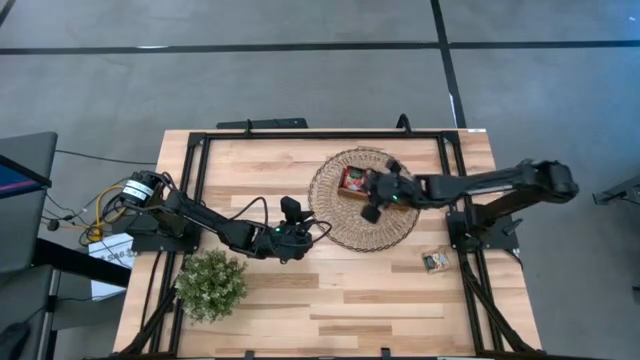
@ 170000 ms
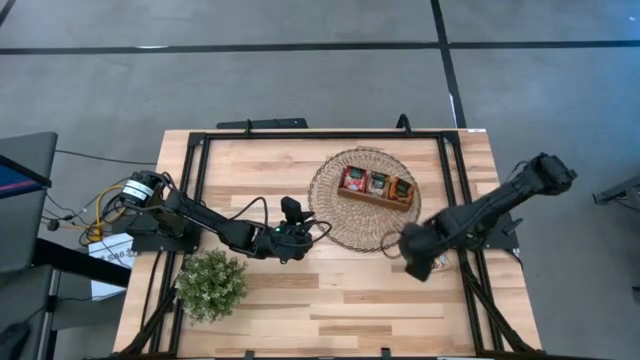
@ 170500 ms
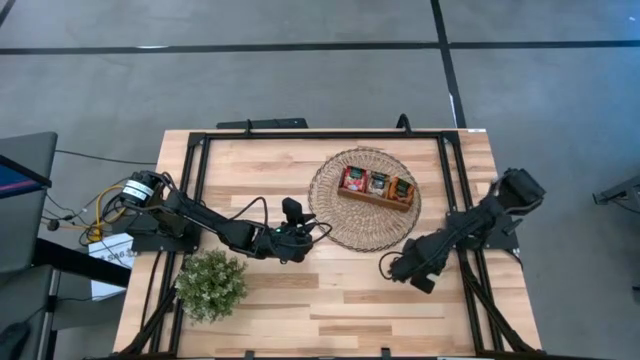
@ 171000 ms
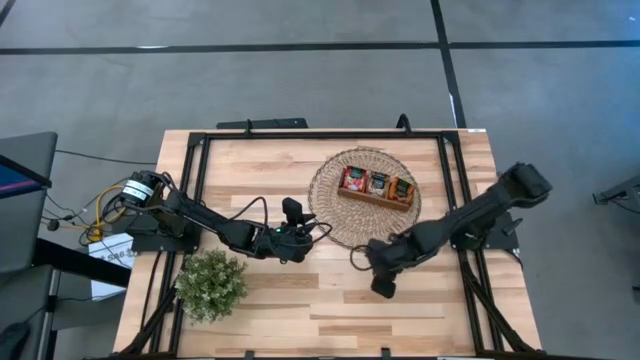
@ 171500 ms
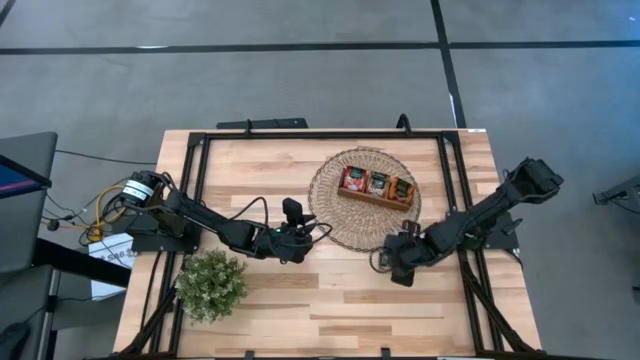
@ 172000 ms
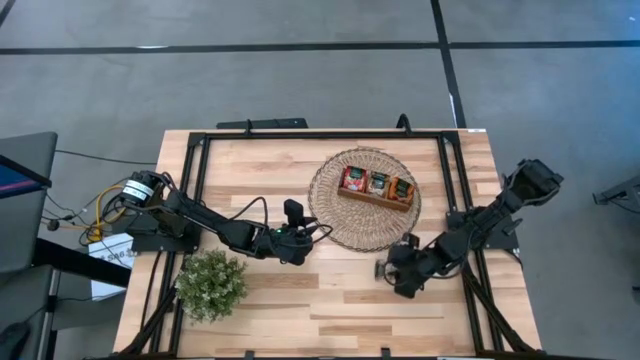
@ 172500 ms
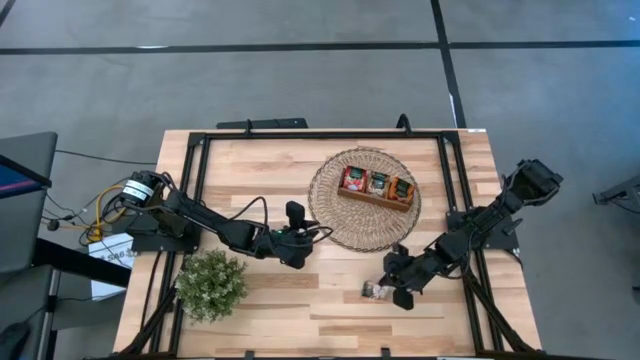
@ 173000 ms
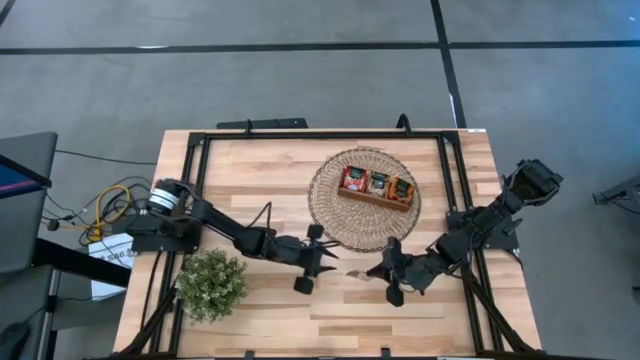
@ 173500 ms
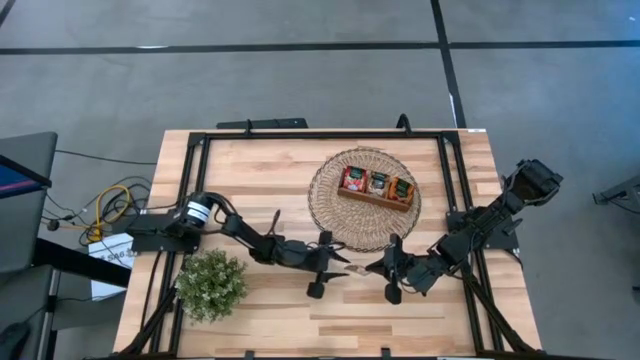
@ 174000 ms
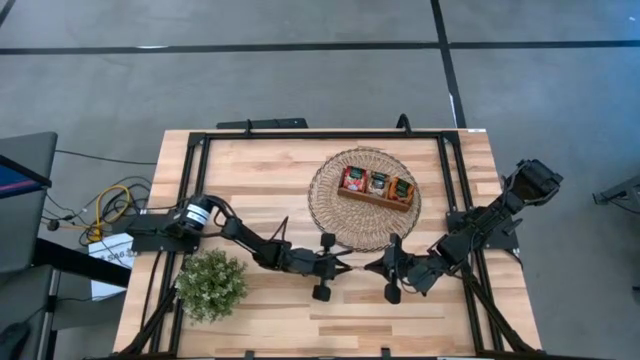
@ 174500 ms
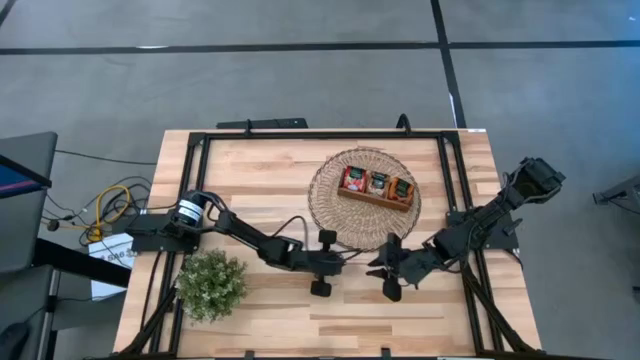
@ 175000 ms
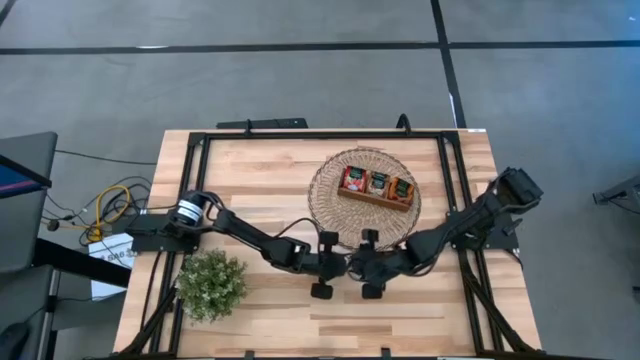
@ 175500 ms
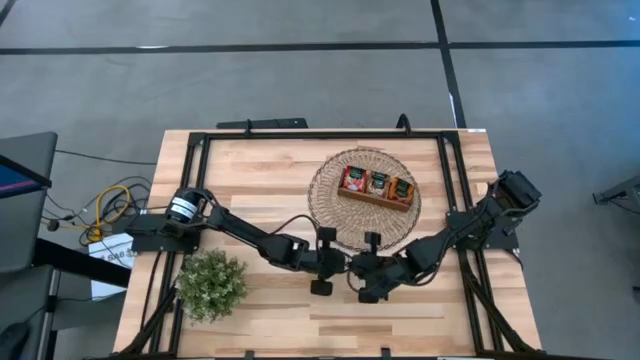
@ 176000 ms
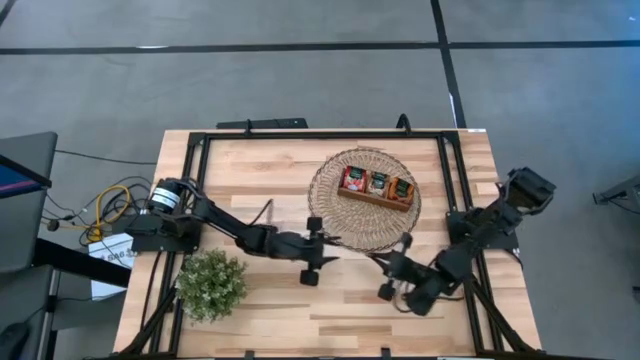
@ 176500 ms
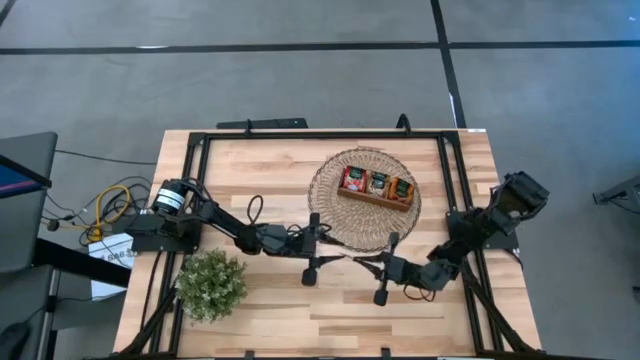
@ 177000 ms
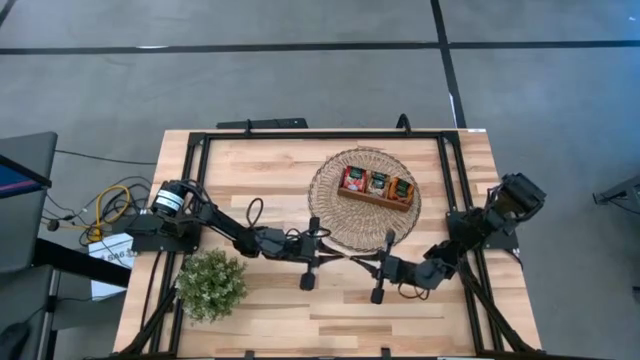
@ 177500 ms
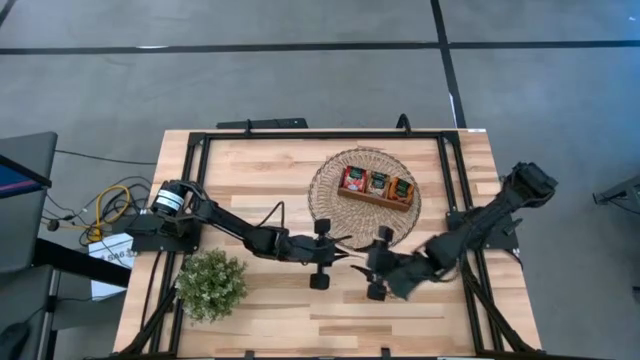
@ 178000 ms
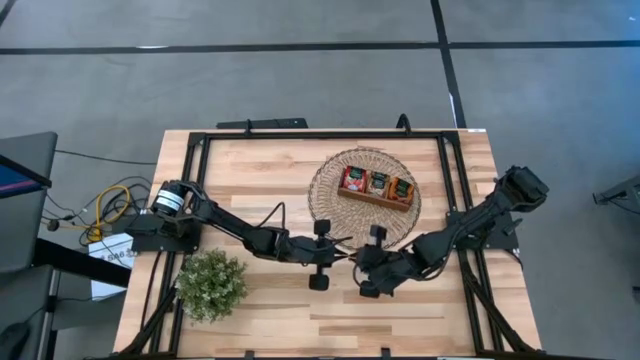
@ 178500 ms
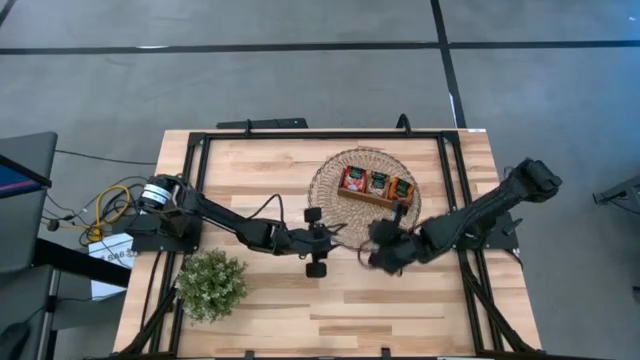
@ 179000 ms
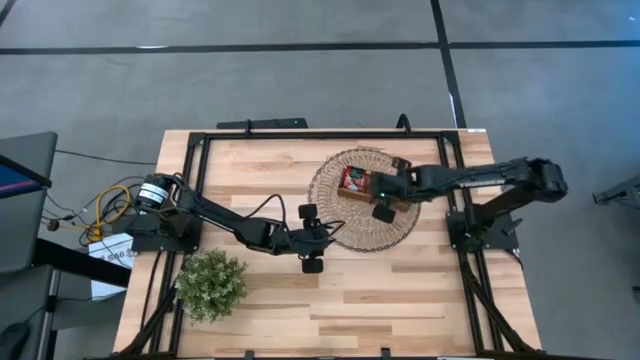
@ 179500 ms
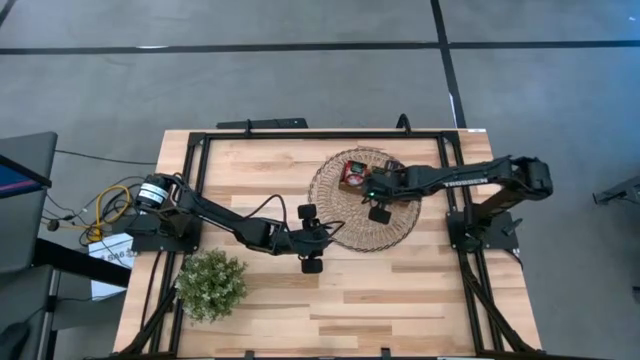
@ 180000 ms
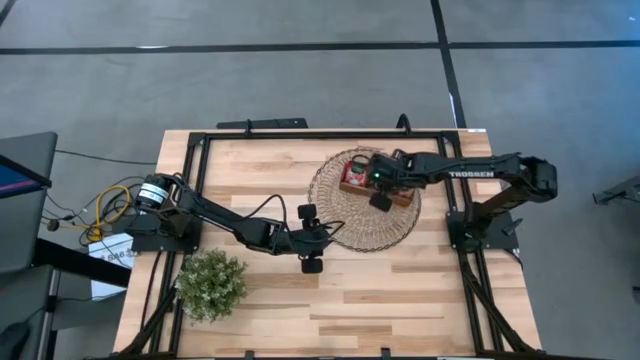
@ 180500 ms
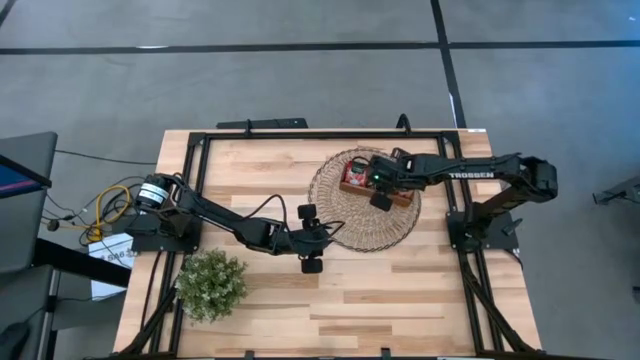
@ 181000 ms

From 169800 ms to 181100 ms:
Task: Pick & Place Tea
Put the brown tea bag into the middle section of the wooden organizer

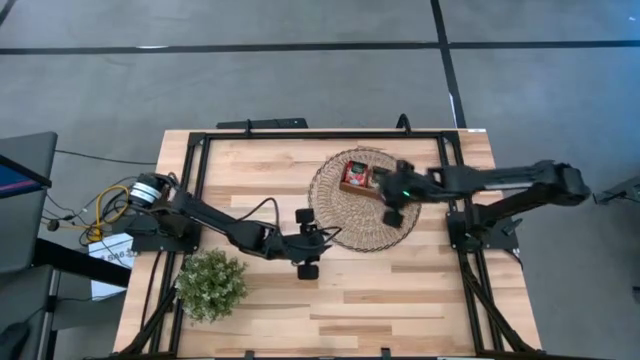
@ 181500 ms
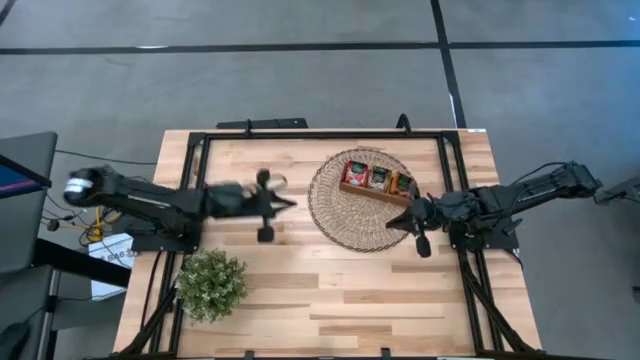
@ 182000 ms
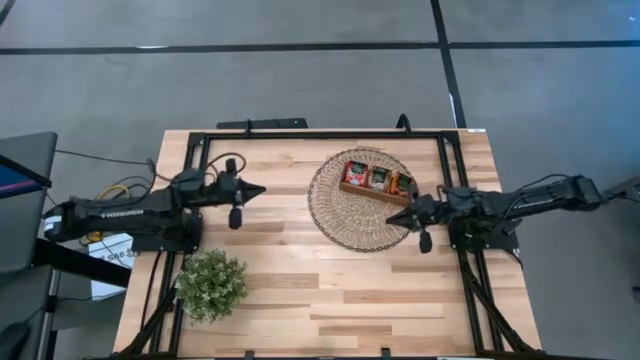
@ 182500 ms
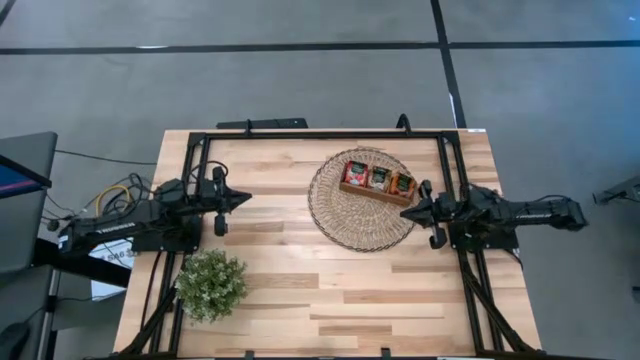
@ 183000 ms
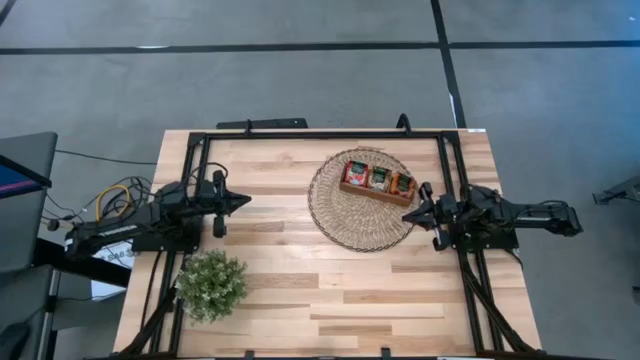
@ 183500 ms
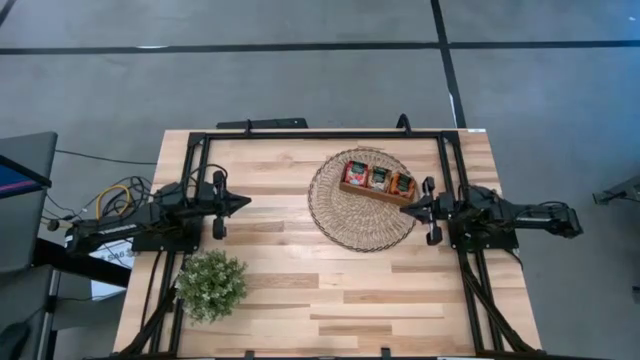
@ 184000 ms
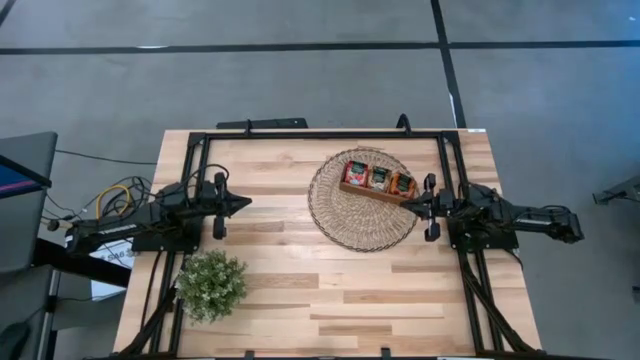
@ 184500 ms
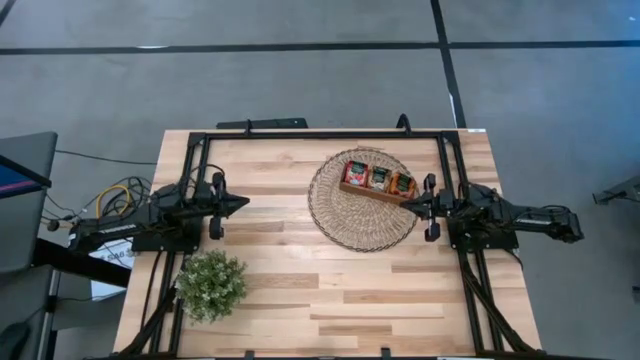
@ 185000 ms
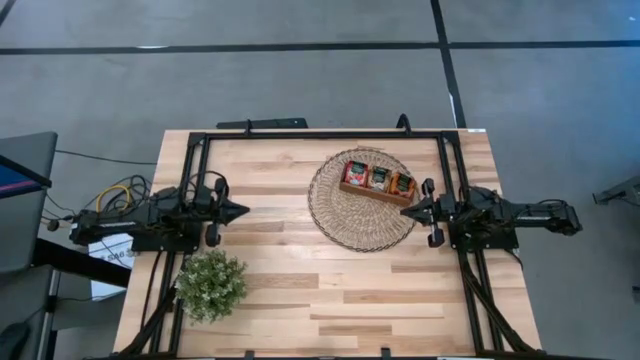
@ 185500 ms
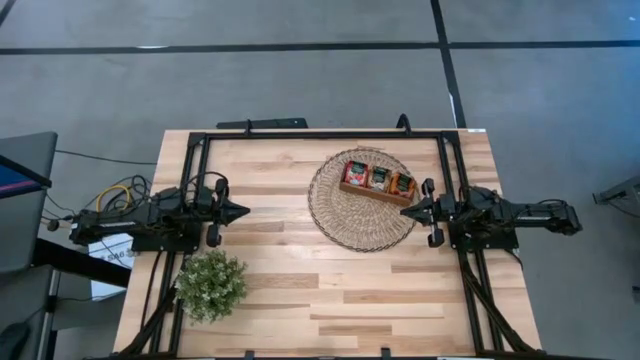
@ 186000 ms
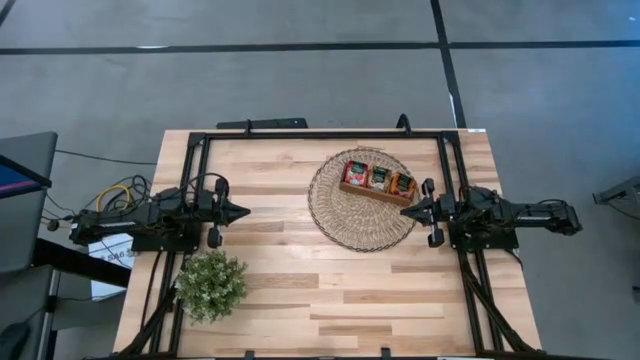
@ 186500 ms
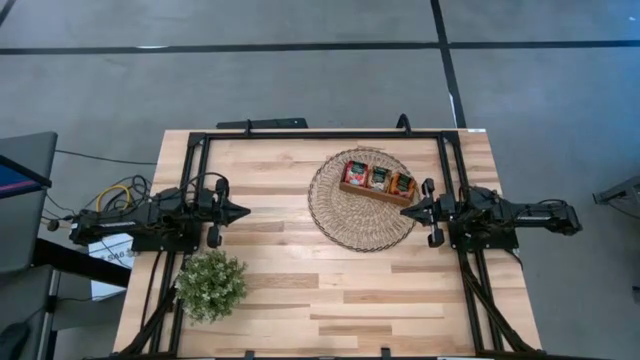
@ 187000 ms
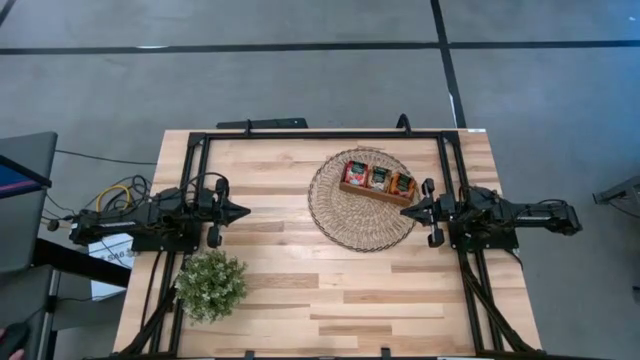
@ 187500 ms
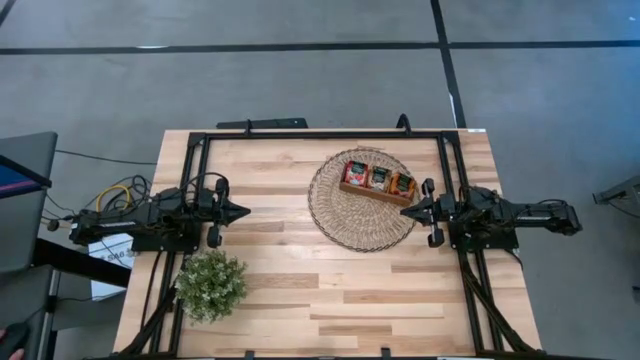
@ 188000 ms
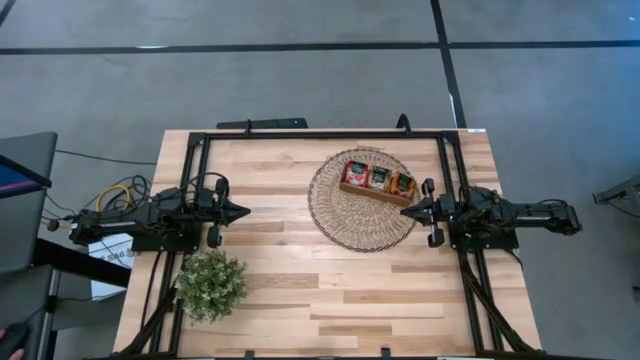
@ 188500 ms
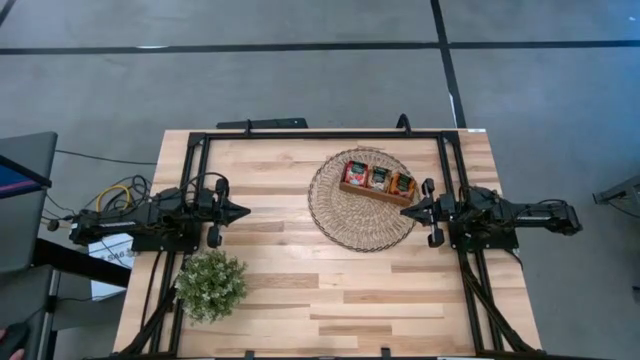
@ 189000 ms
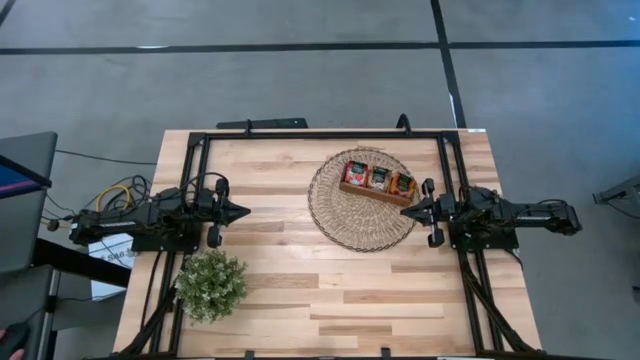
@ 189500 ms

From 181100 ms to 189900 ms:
Return to Home Position

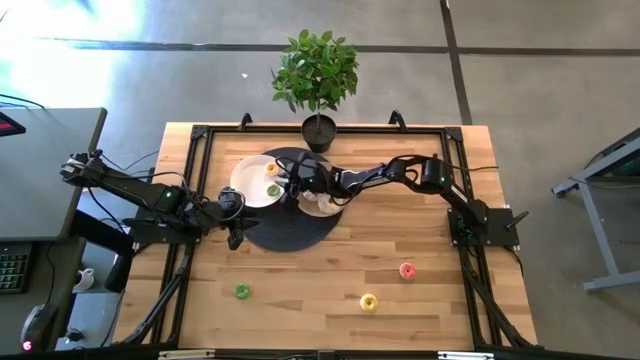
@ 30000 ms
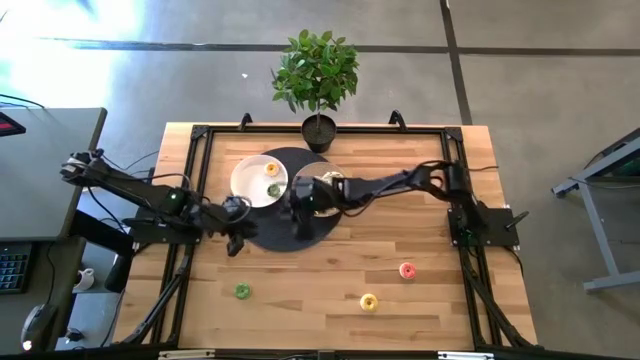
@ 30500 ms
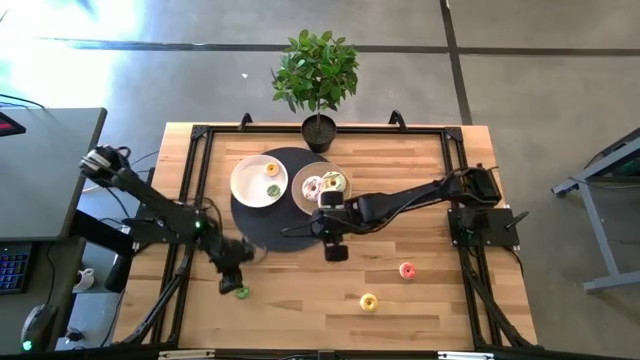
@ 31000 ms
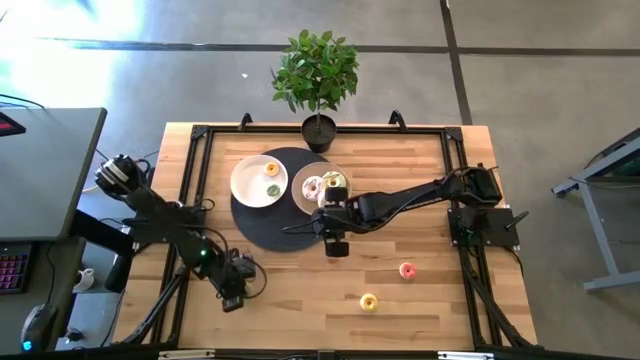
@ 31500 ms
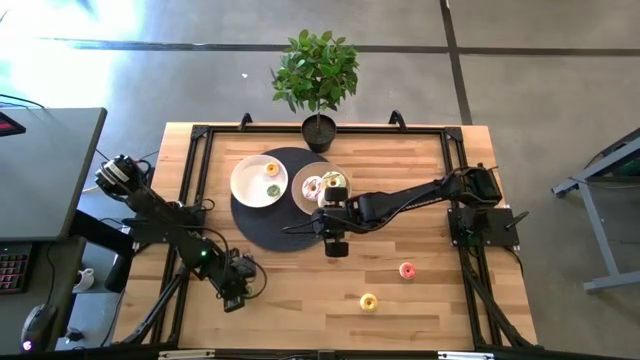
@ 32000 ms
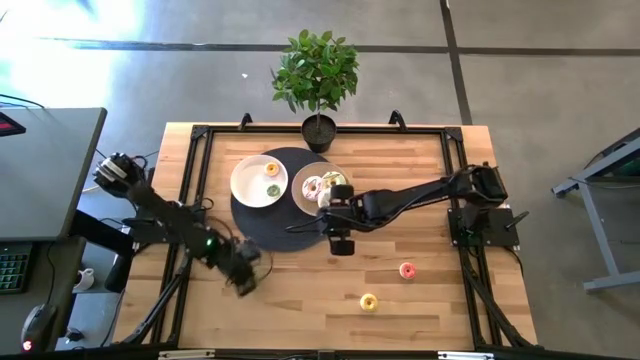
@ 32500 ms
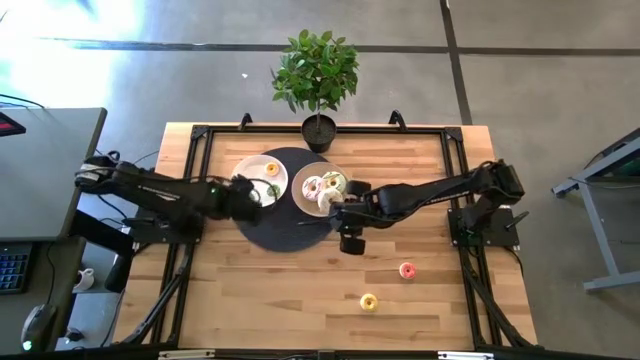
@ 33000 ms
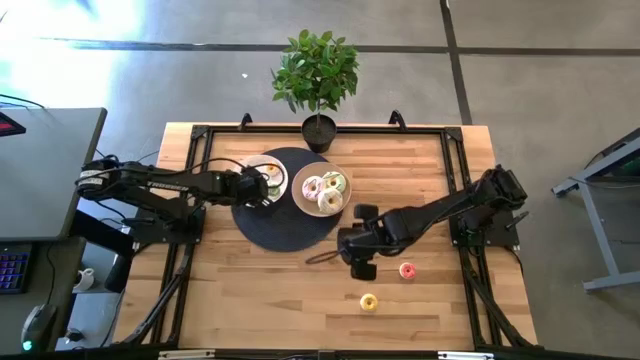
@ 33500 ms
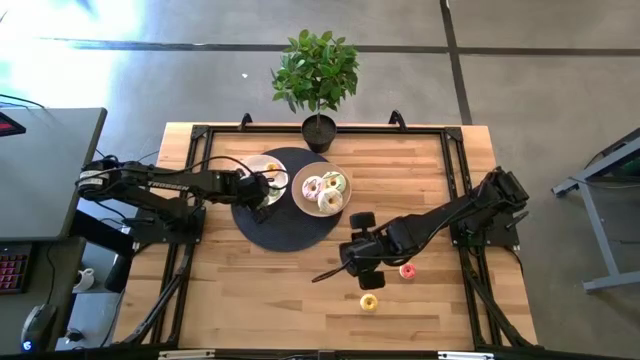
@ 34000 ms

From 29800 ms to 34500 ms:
Task: Pick & Place donuts
Put the small green donut onto the white plate
